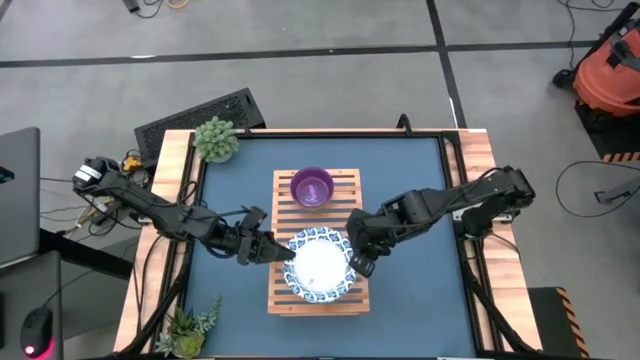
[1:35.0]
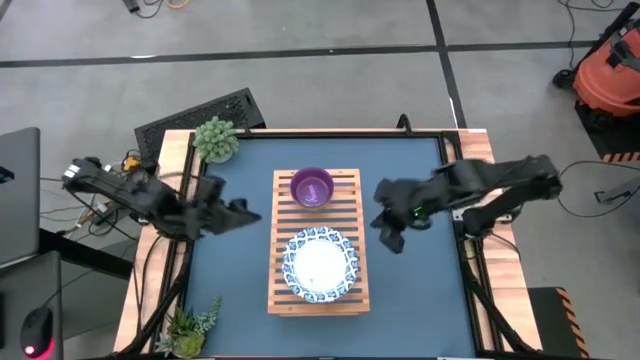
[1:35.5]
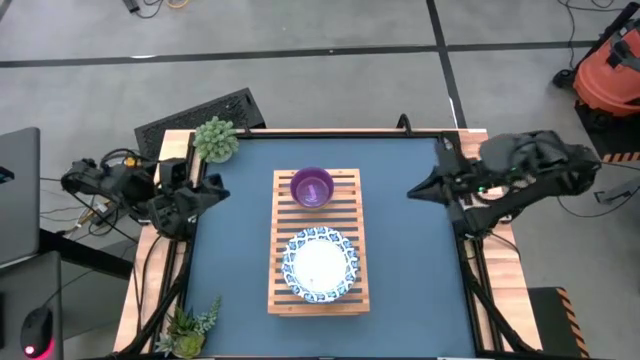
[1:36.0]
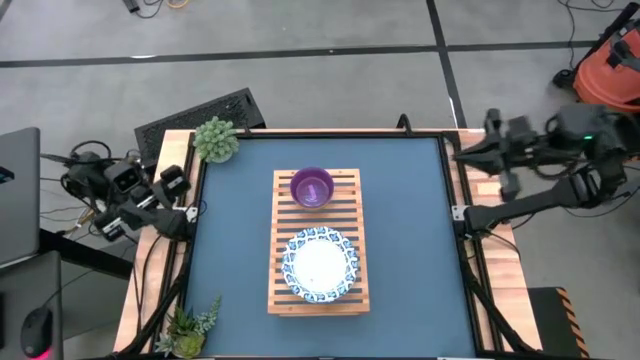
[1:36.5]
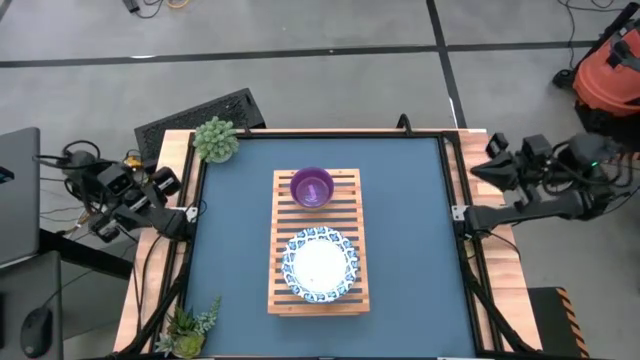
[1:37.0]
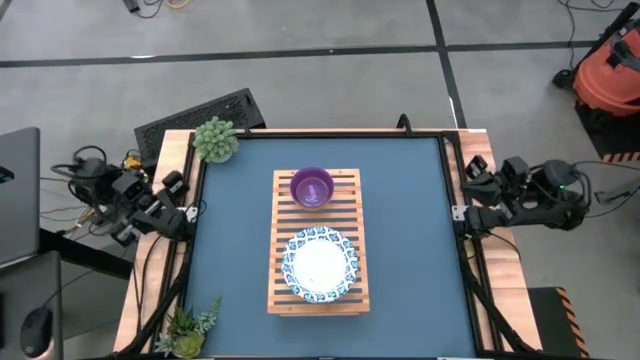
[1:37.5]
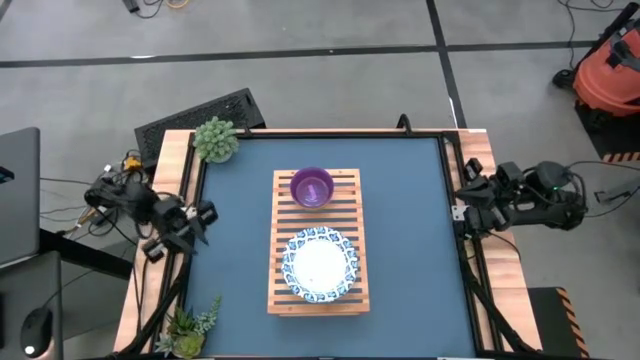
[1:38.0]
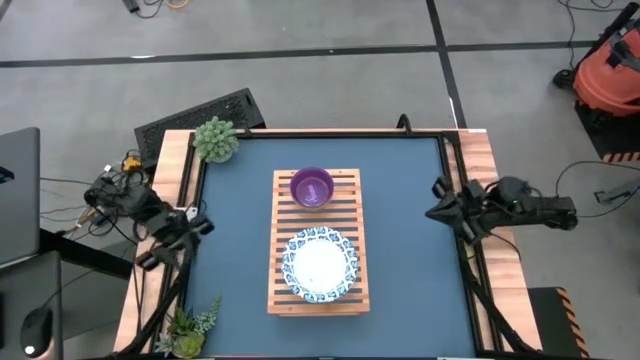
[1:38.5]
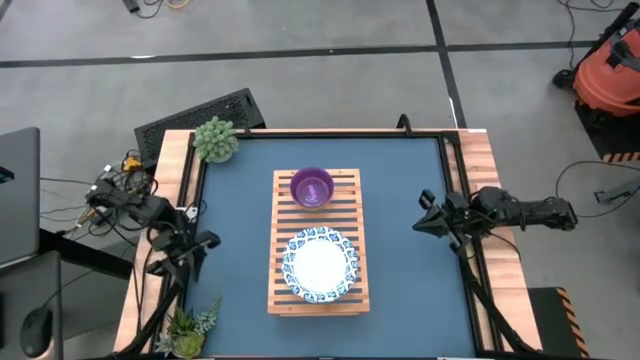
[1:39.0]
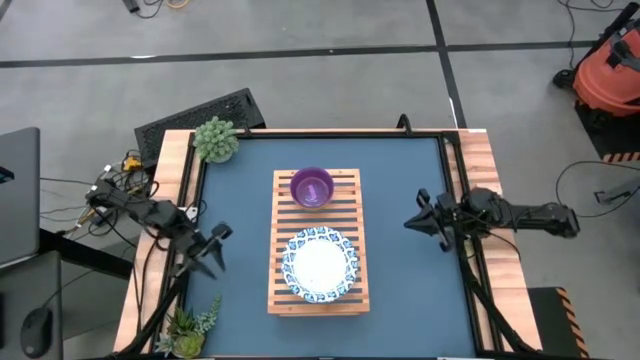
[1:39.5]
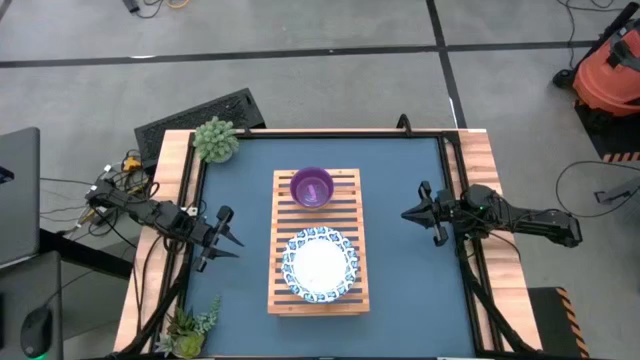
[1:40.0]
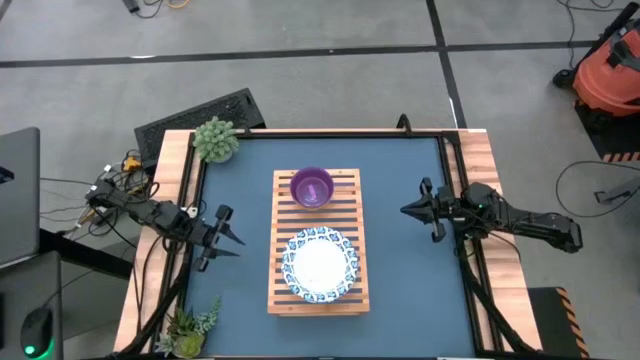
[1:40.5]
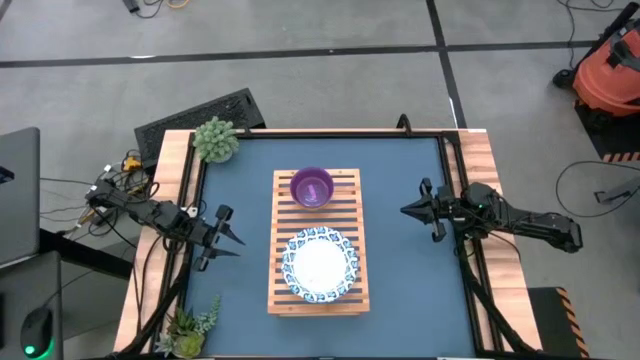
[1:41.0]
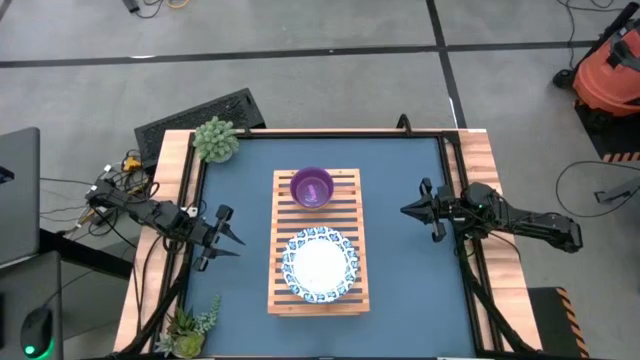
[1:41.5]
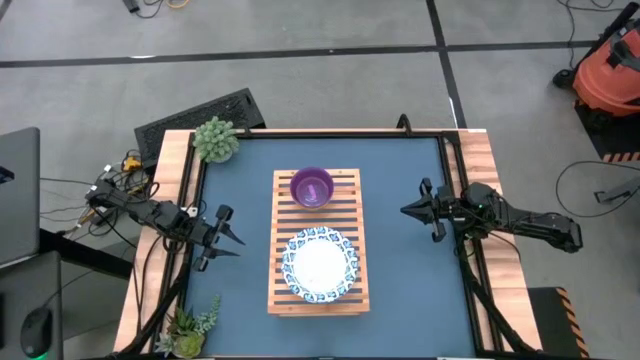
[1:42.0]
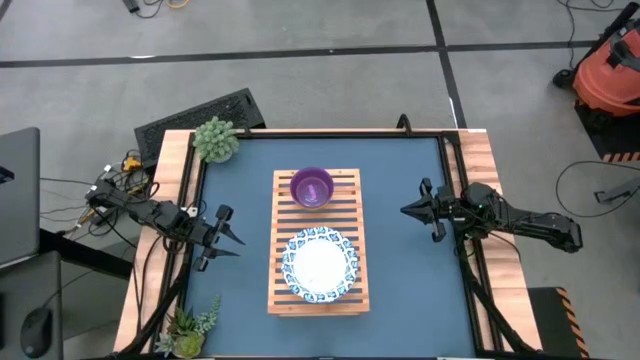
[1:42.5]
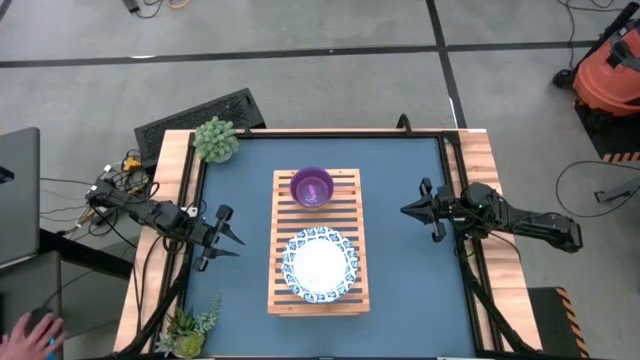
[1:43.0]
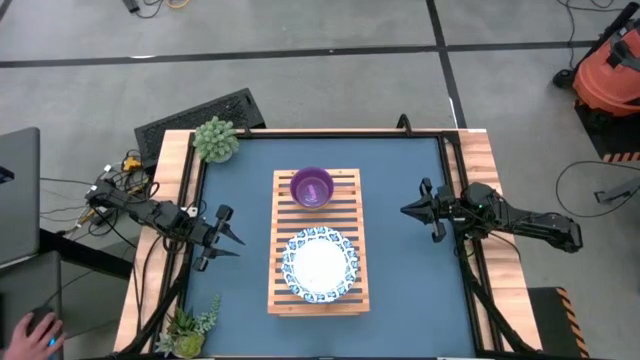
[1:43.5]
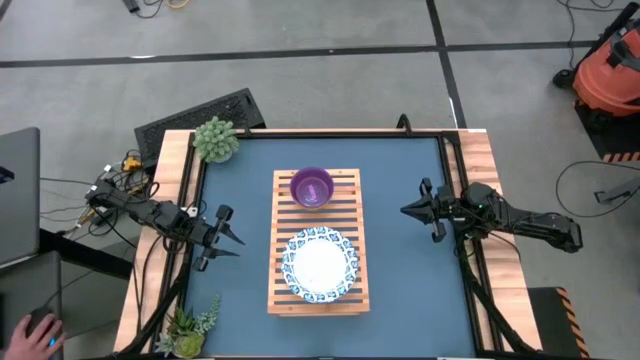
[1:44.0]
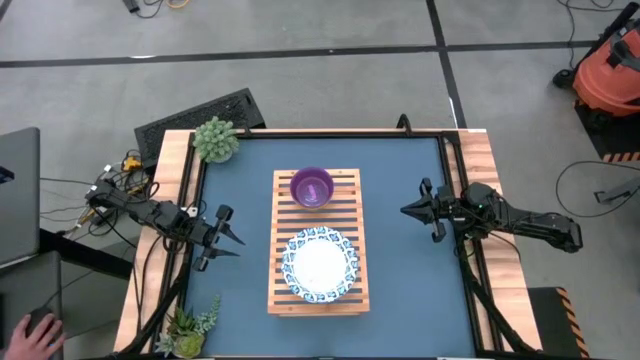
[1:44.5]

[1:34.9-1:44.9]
Task: Place and stack bowls onto a shelf
Return to Home Position

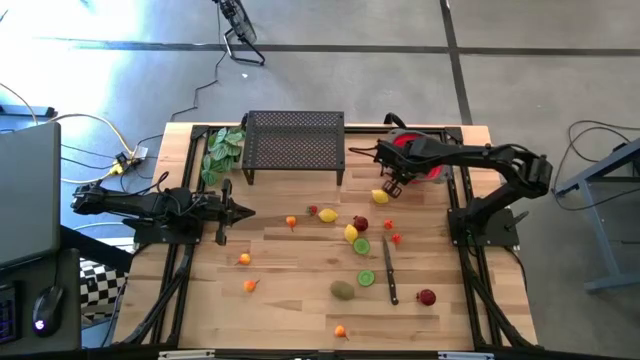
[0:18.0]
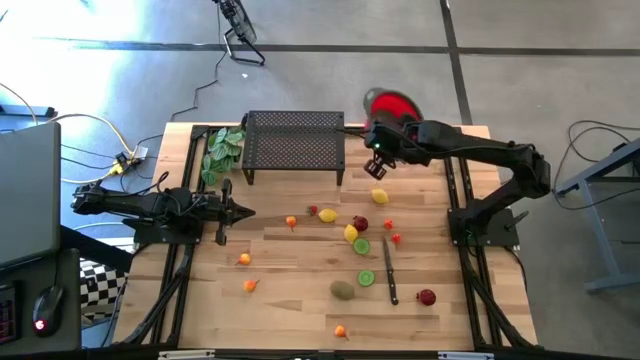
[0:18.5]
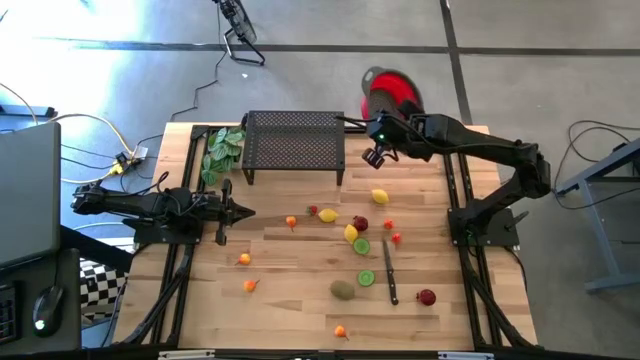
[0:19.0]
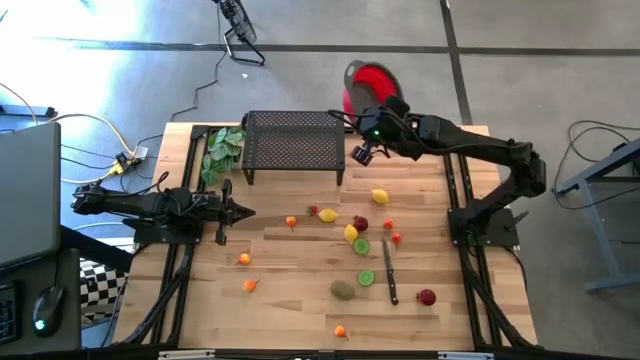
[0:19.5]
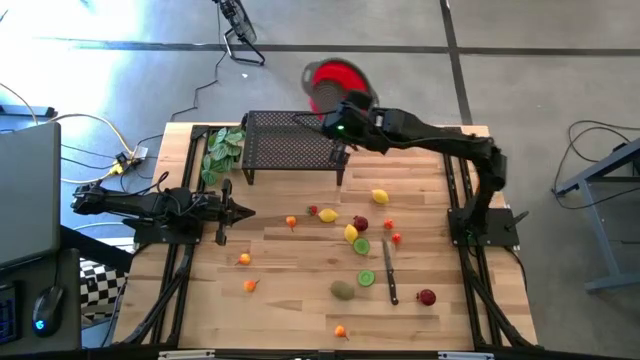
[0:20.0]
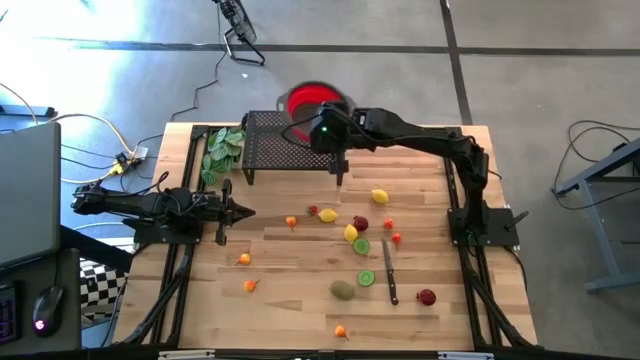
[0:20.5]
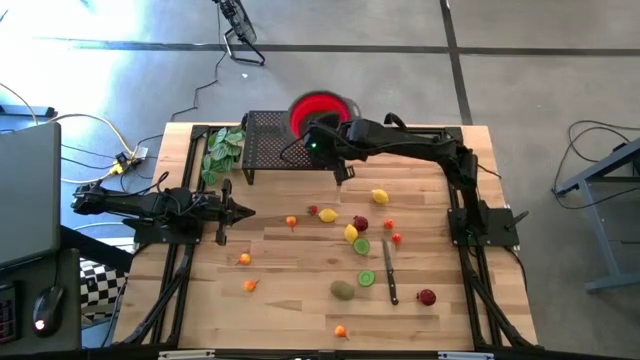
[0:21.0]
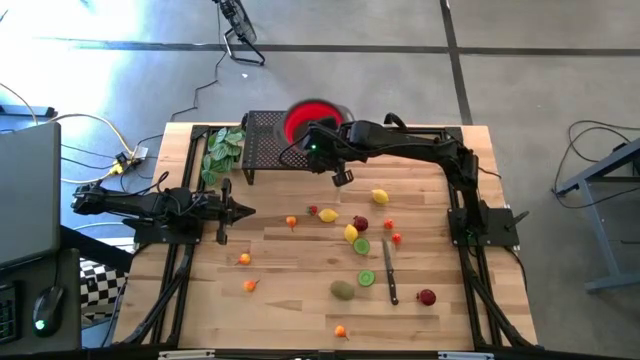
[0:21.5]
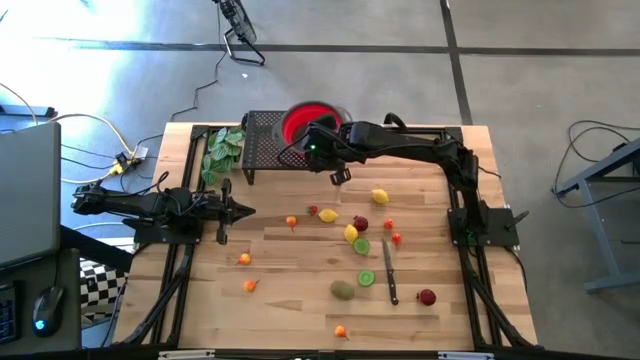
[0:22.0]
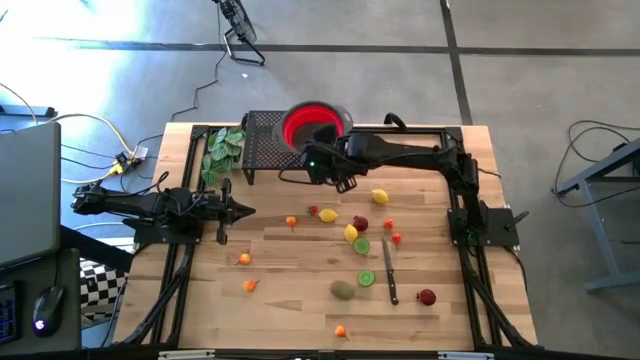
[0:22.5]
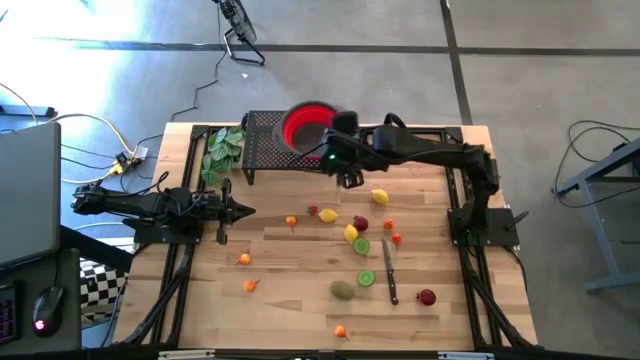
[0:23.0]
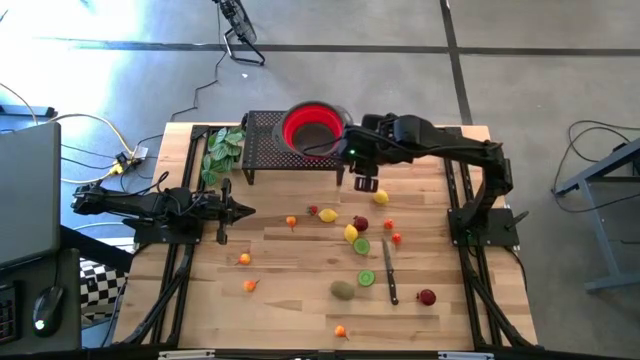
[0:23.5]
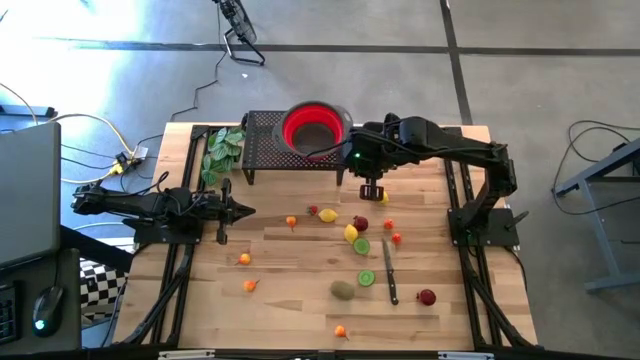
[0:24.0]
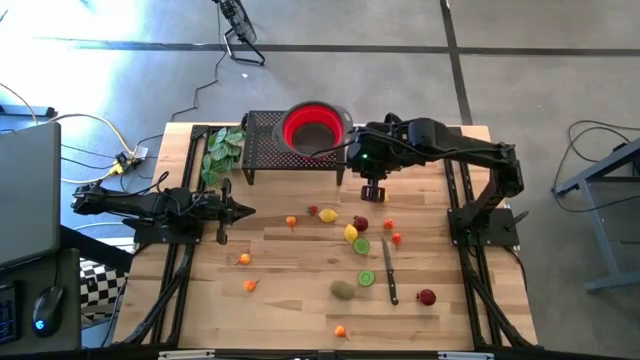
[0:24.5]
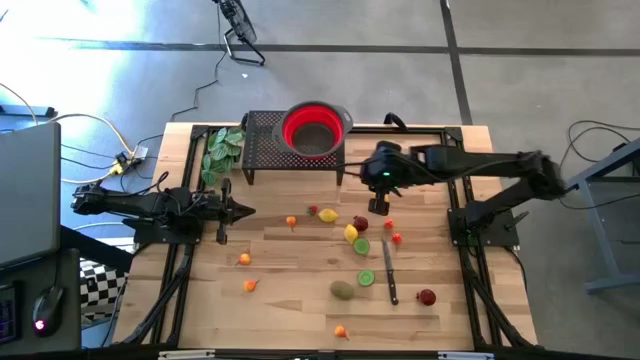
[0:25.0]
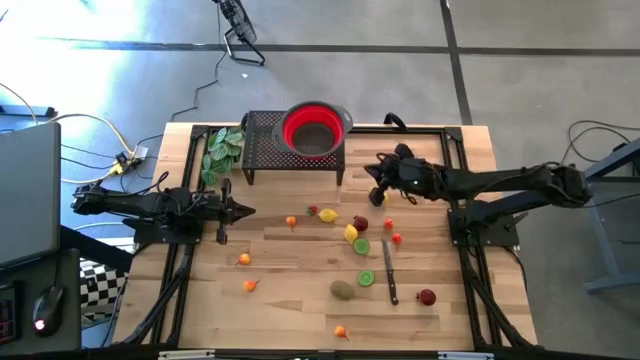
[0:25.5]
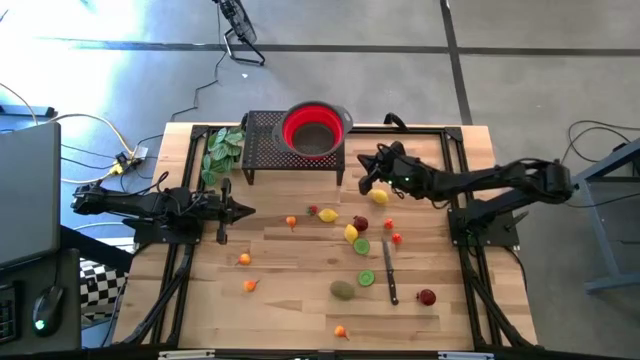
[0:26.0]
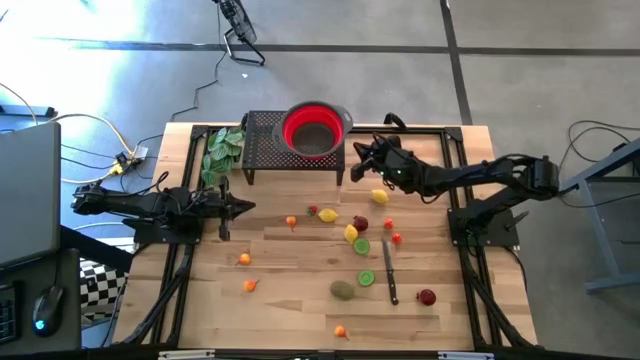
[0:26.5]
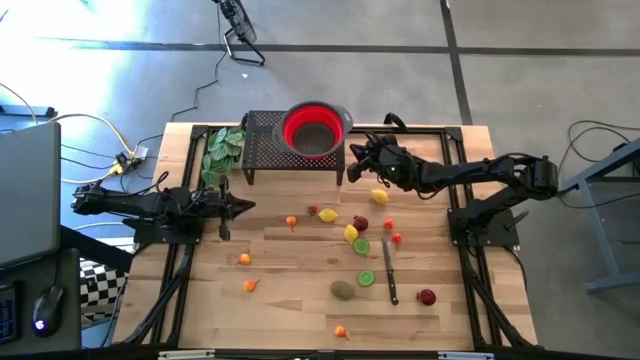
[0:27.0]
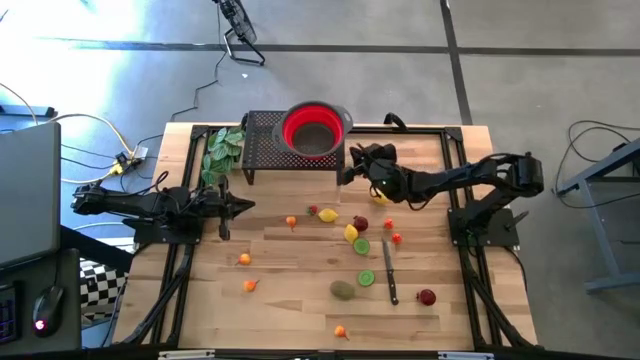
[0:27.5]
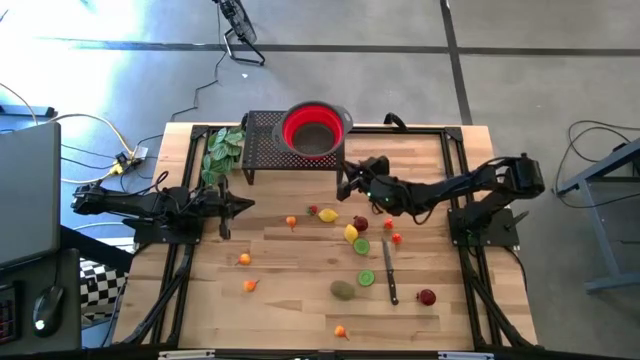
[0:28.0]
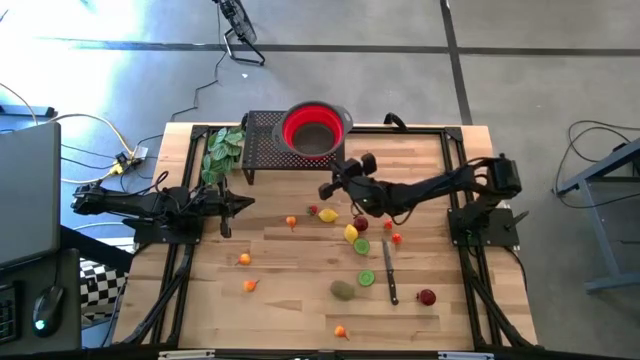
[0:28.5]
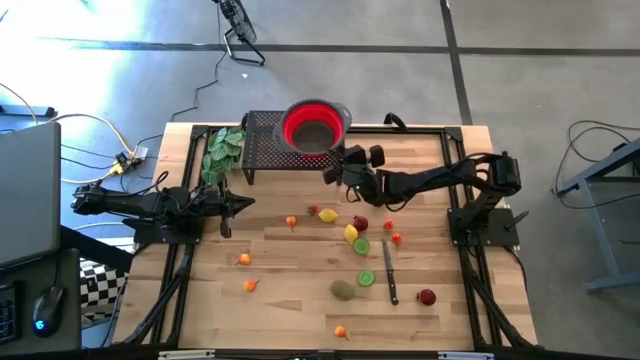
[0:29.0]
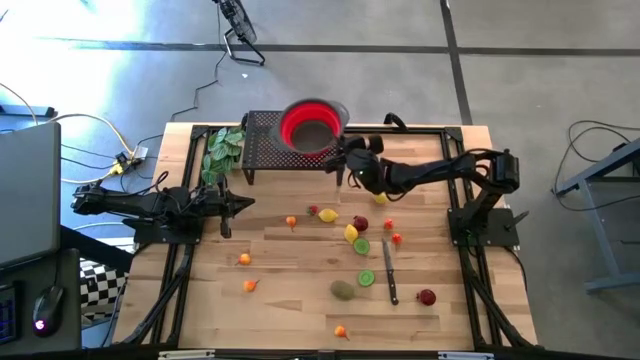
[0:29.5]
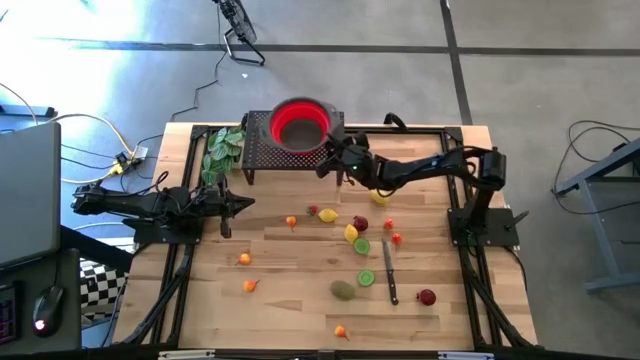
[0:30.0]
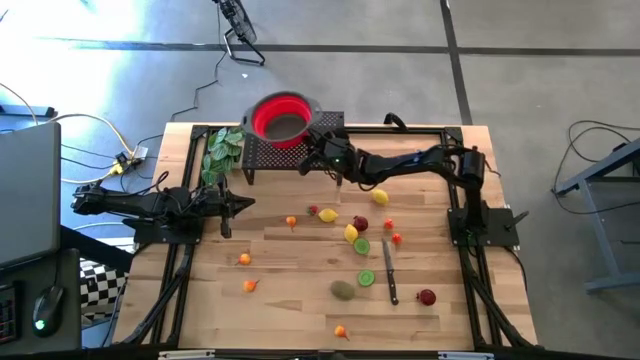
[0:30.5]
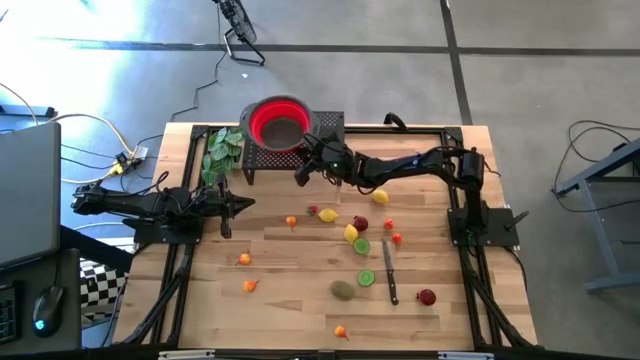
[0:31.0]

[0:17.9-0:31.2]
Task: Pick & Place Fruit
Put the red strainer bowl on the shelf
